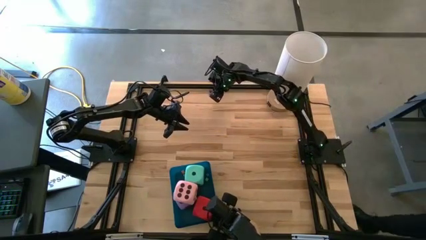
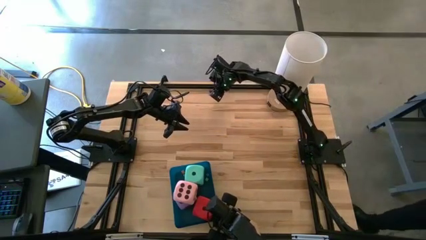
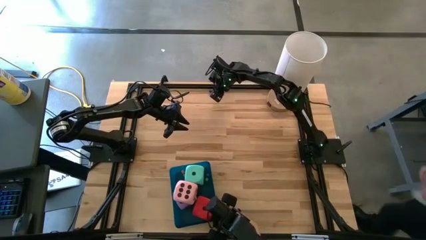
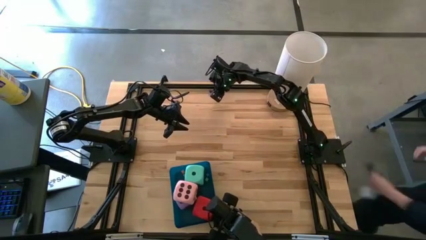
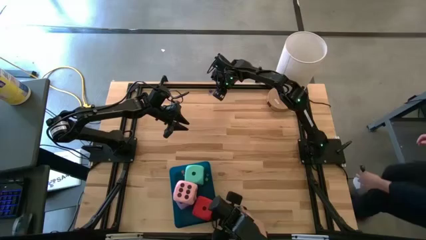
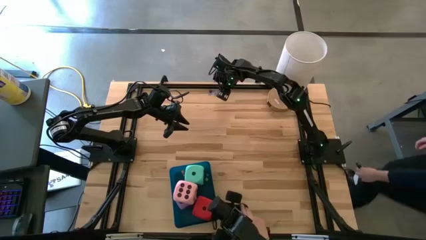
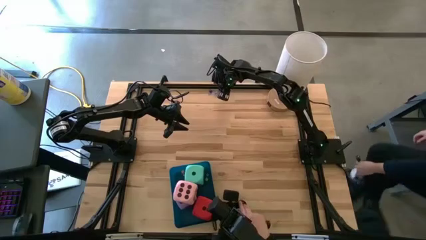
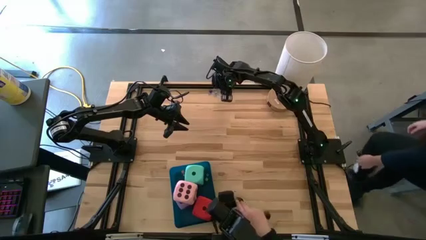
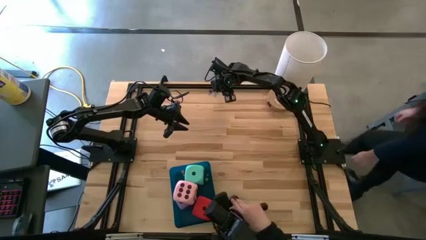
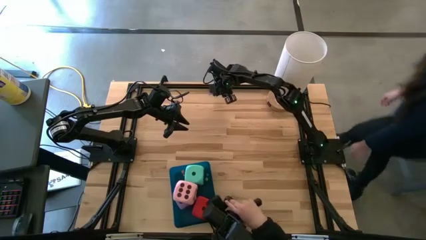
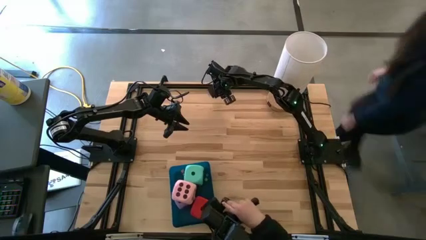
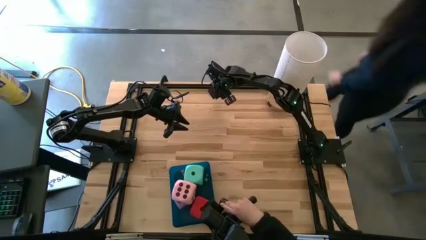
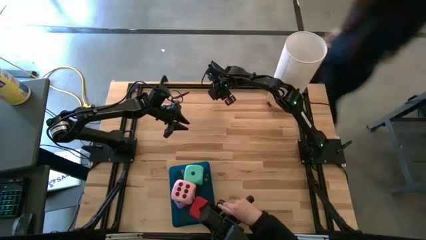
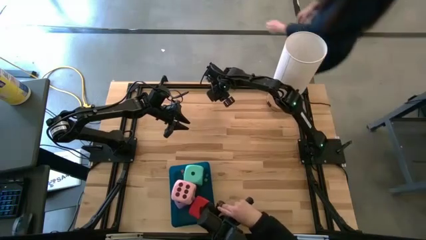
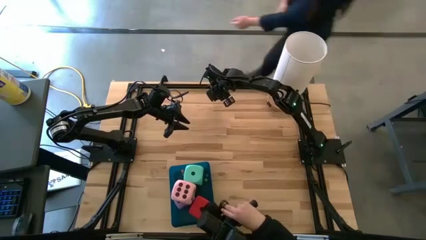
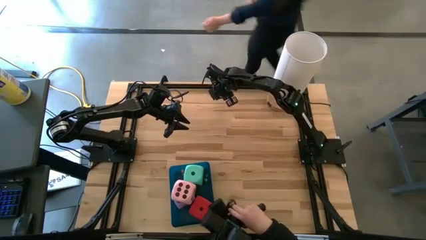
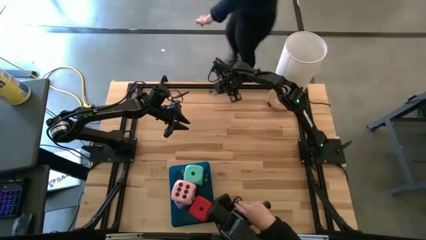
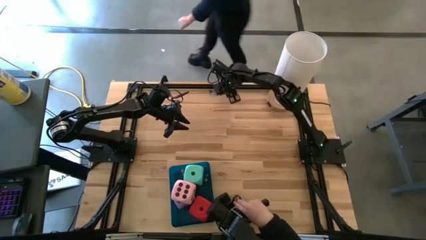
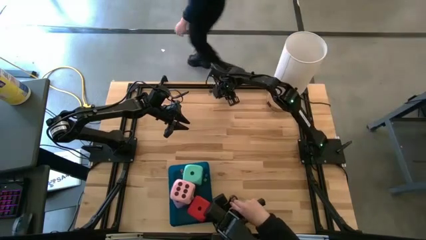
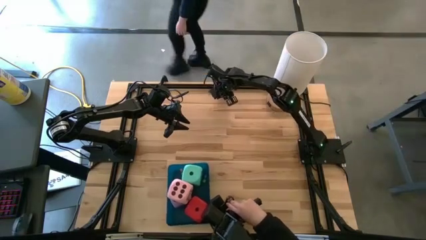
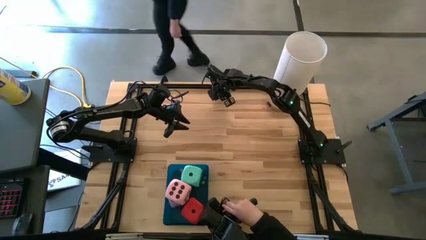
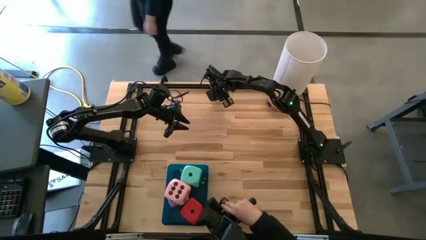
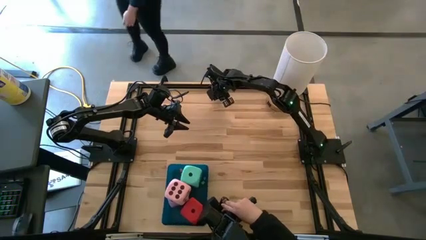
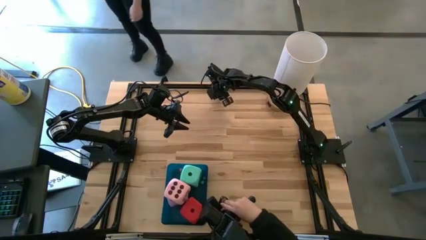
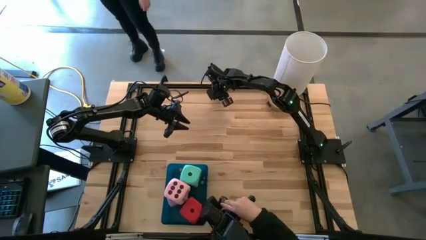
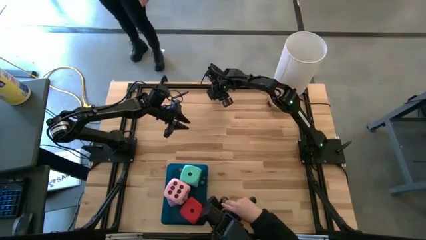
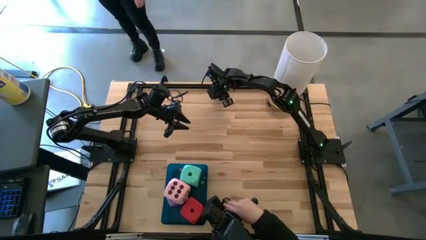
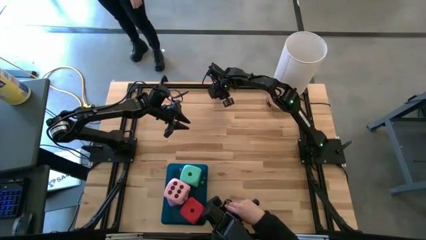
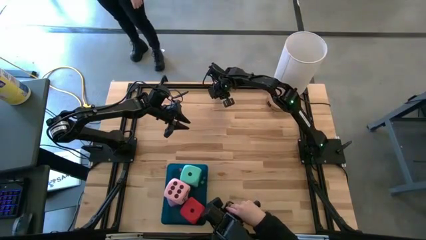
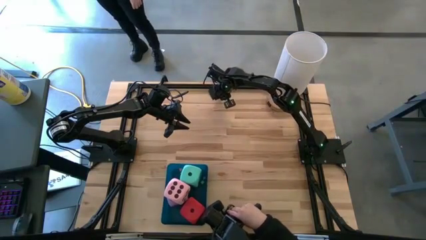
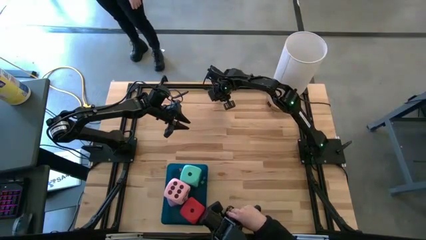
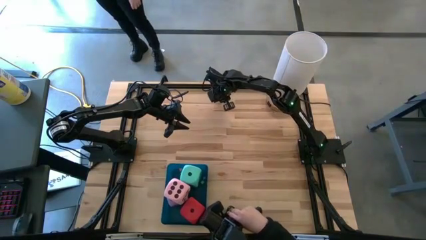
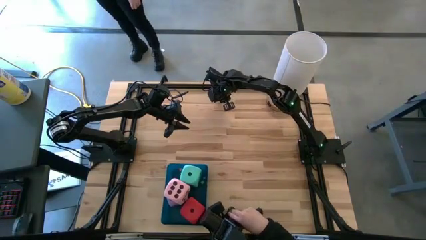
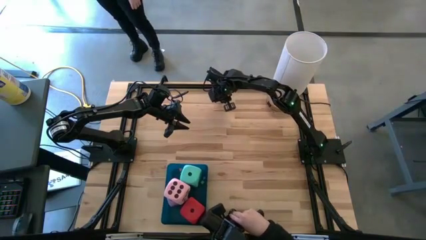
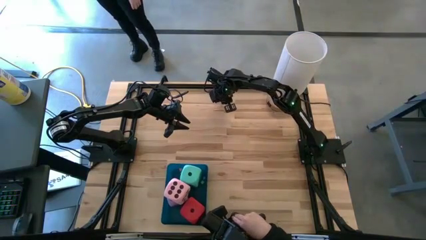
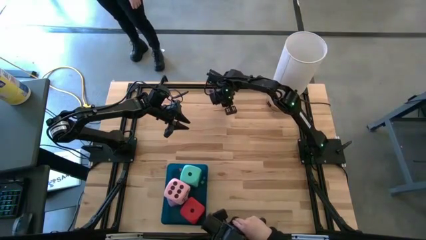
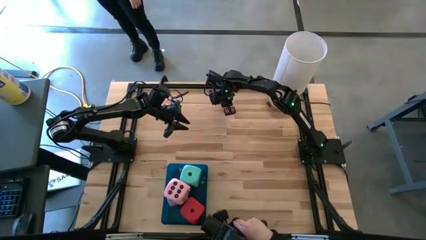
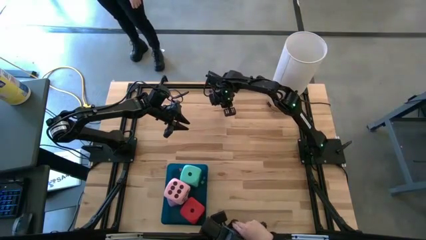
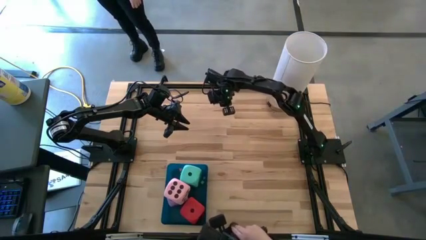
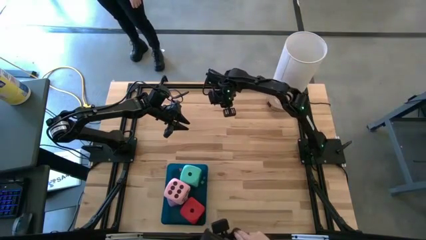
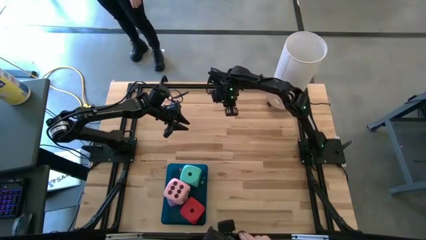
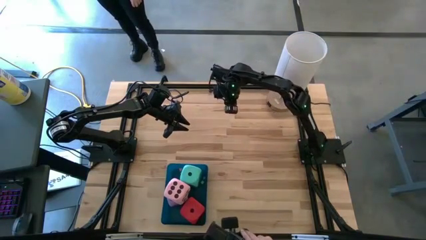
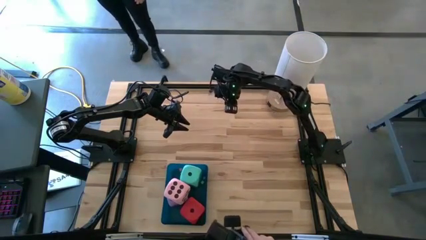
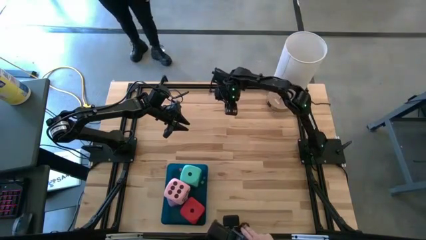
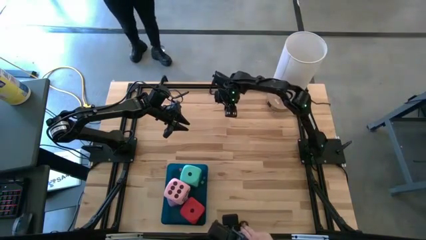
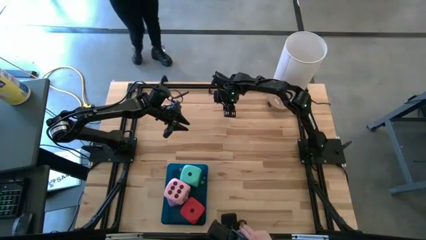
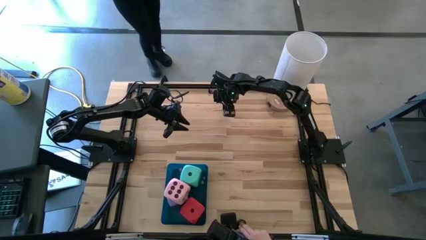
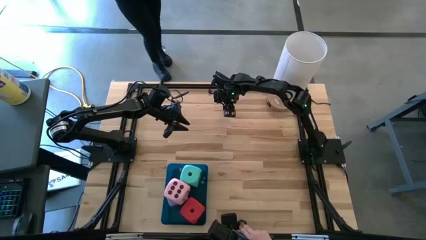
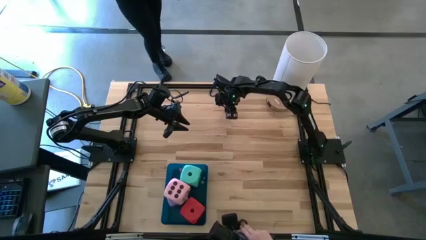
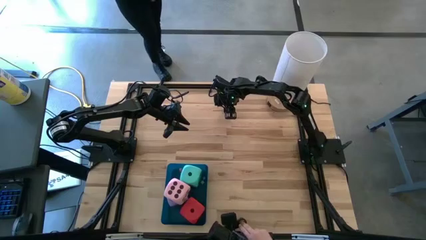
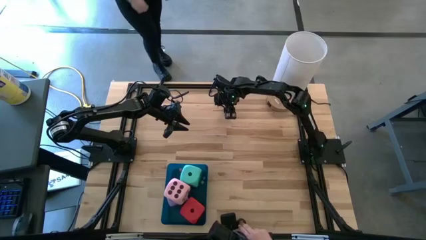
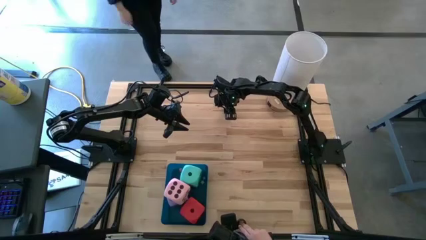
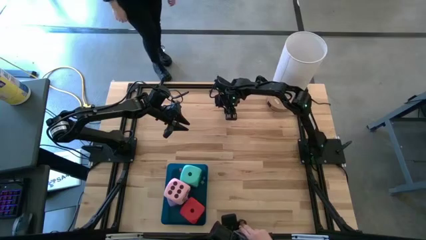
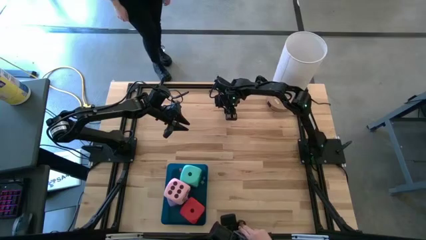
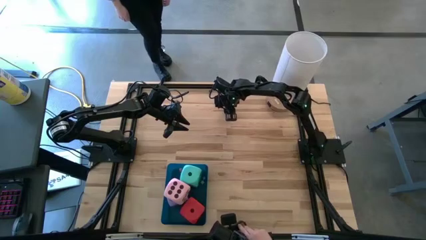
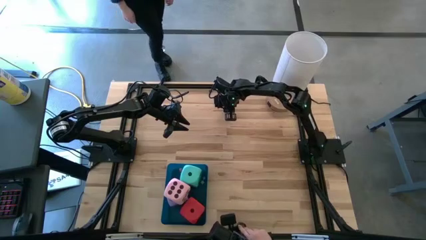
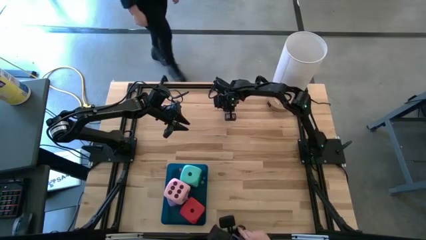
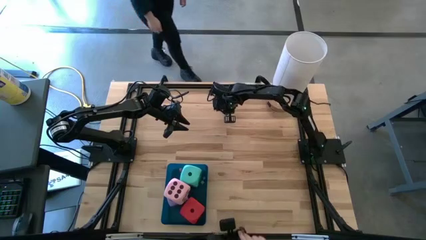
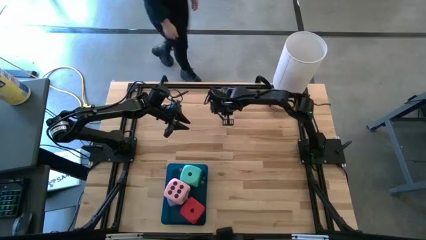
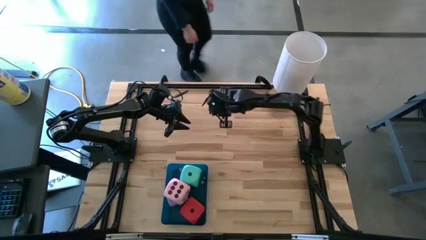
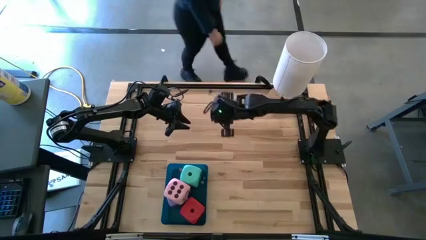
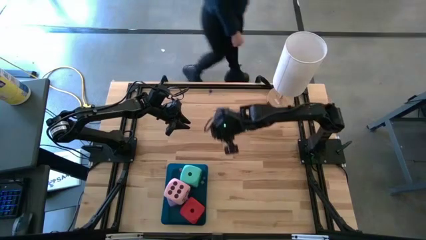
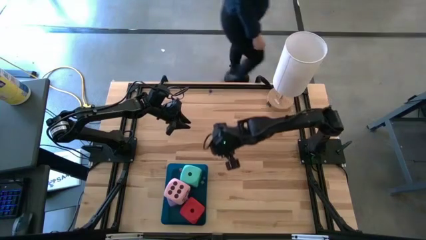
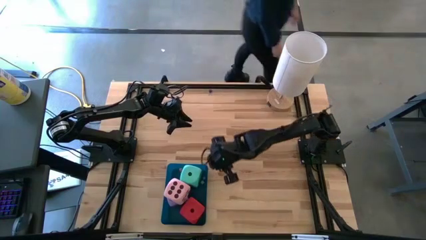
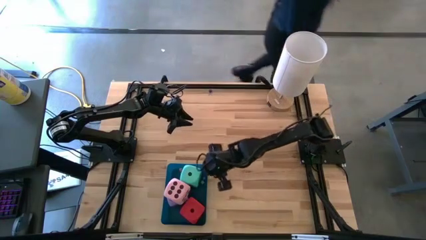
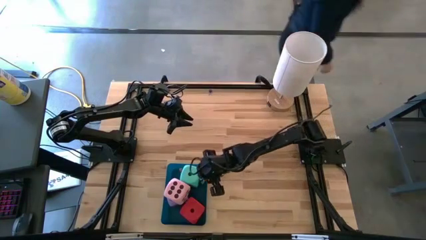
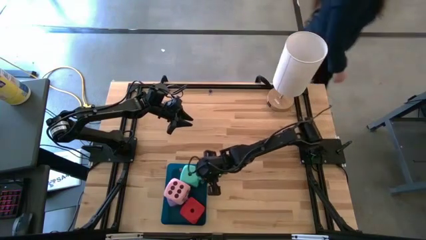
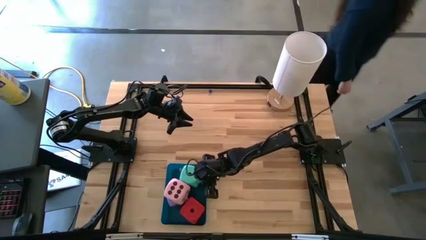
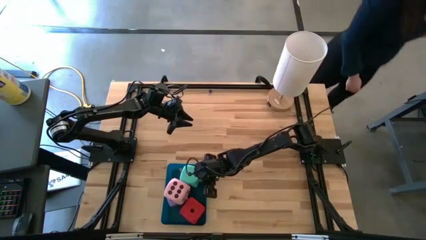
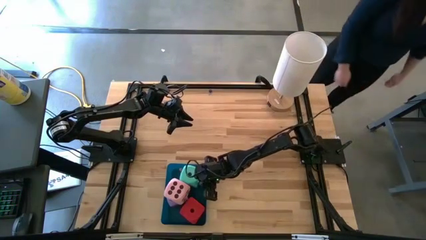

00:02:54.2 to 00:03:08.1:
Task: Pick & Place Dice
Put the small light blue die into the blue bin
